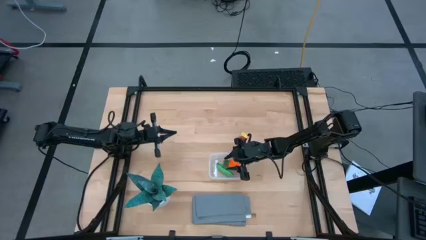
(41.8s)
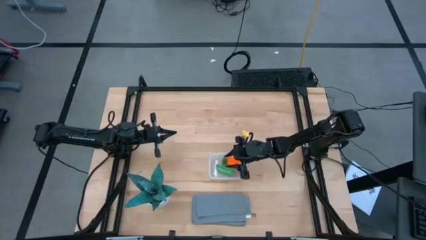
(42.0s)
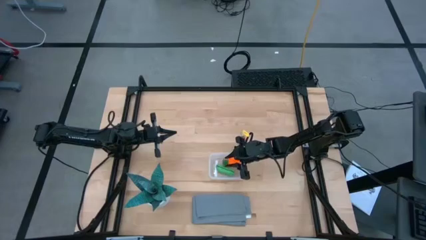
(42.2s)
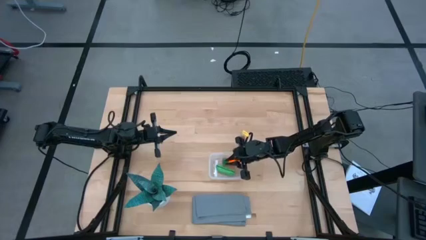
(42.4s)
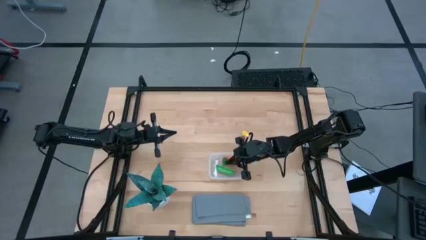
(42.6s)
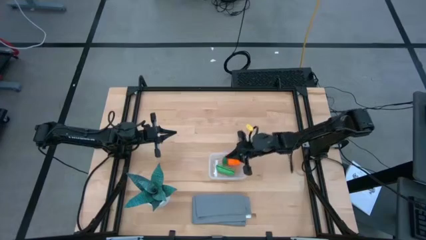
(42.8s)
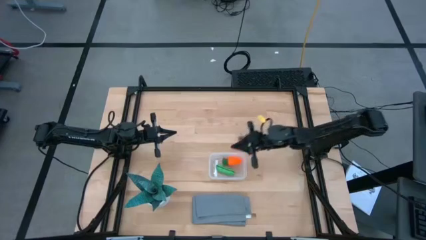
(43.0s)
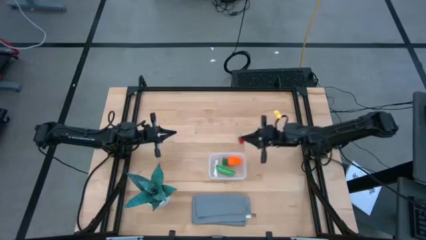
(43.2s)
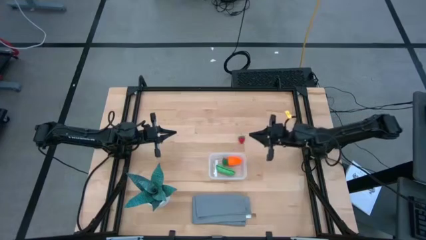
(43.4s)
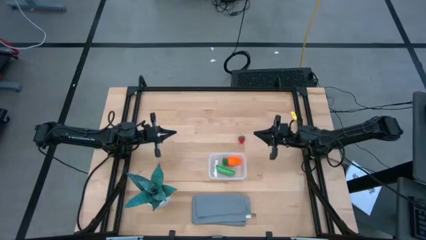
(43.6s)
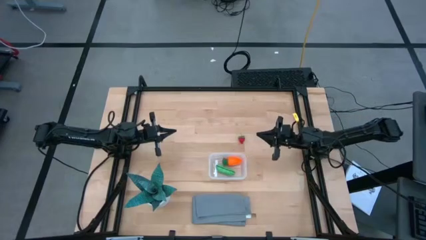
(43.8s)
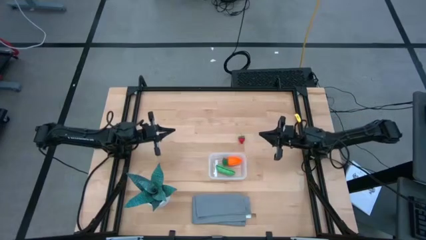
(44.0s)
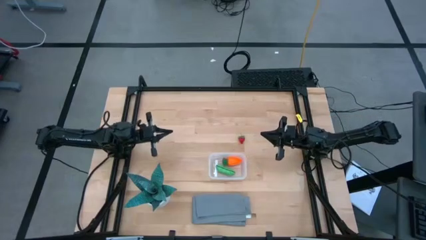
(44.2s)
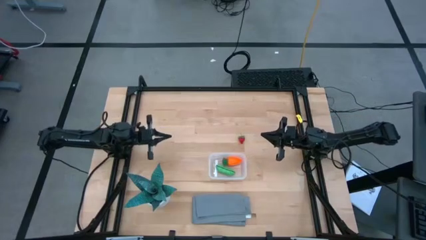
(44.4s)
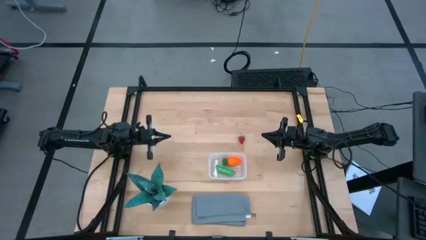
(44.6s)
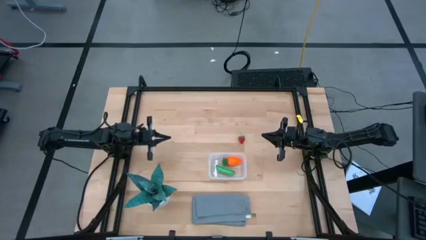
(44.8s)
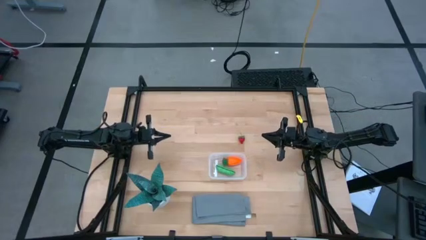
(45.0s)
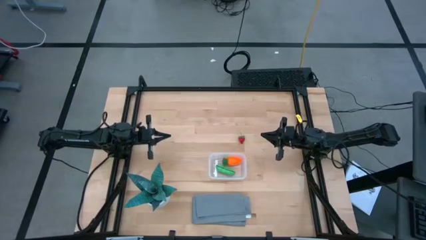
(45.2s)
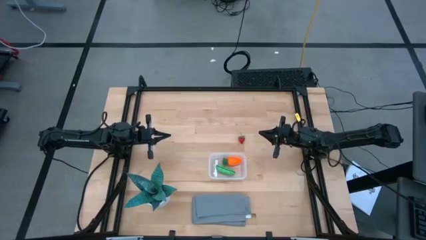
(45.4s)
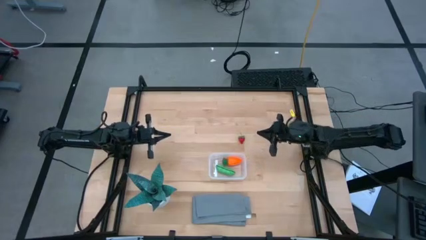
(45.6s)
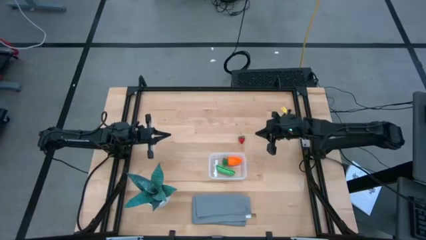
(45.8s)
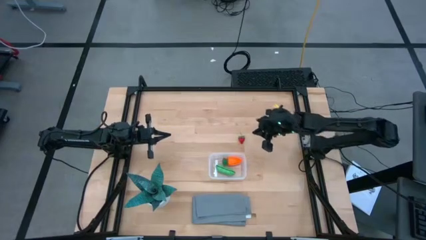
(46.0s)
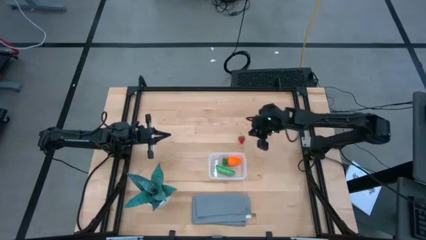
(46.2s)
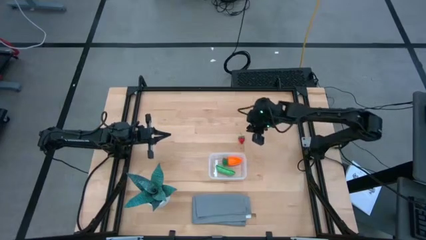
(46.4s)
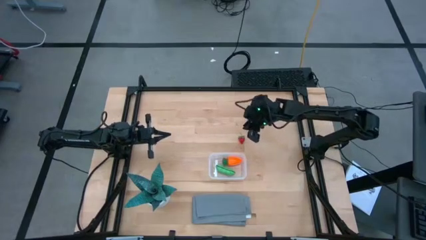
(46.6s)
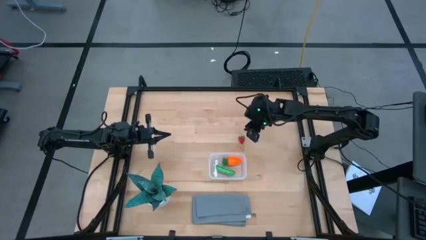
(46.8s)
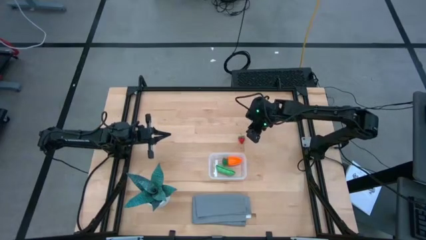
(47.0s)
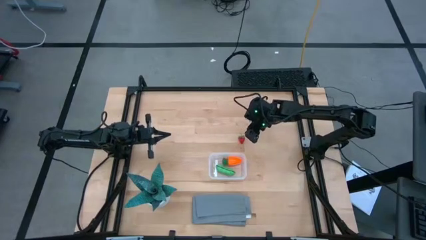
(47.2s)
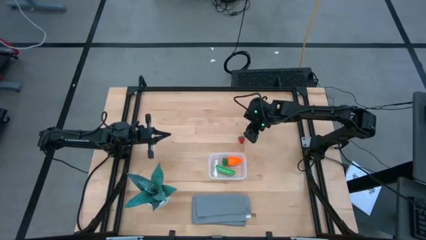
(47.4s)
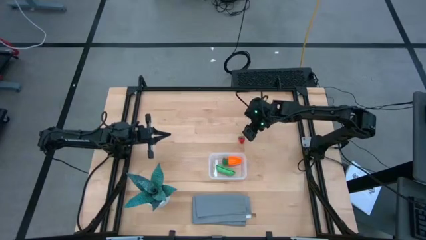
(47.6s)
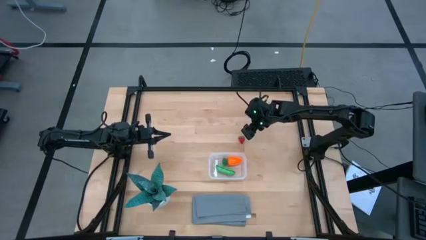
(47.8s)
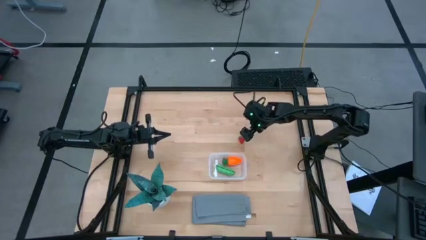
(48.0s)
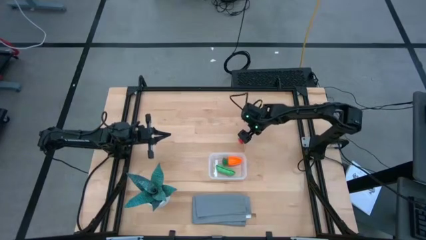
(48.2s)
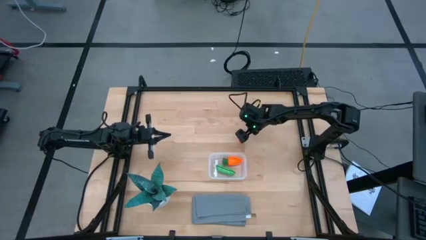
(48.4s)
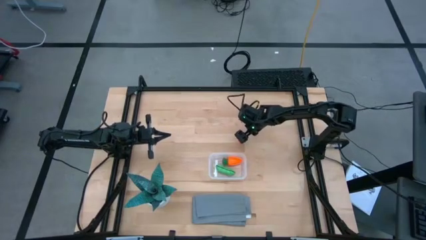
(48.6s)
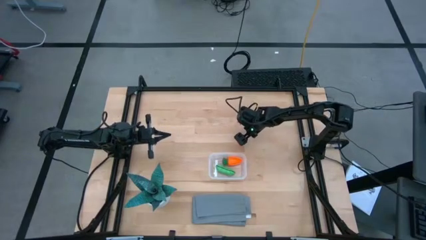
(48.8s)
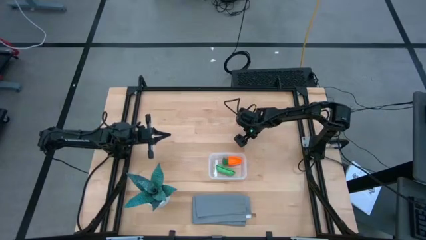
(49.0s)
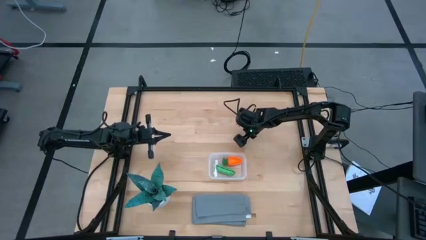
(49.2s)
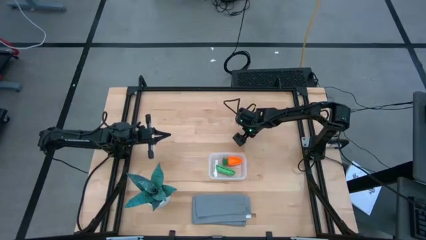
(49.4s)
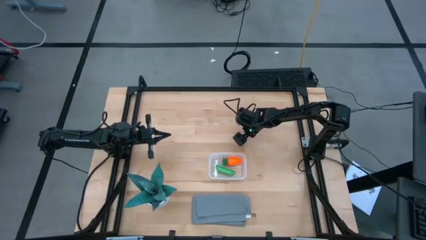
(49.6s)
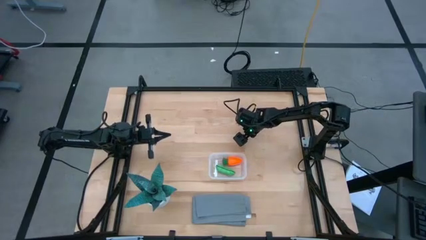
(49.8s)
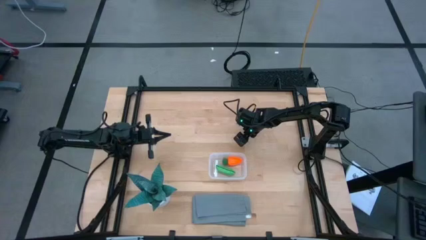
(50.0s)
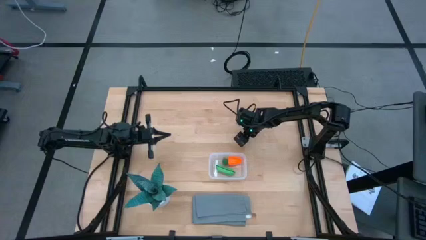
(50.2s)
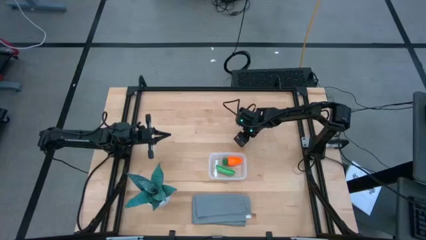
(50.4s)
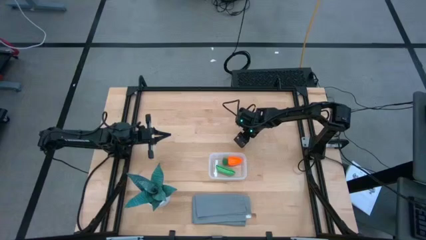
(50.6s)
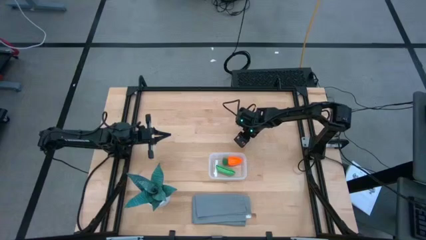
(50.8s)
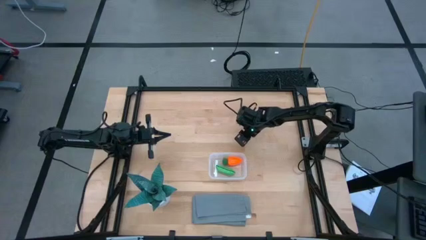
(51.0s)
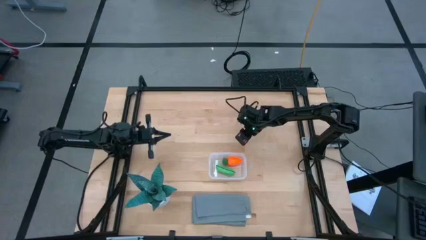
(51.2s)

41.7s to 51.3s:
Task: Pick and placing Produce into tupperware
Put the red strawberry into the transparent bin

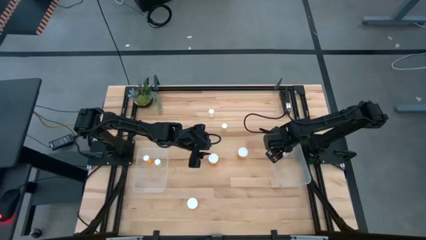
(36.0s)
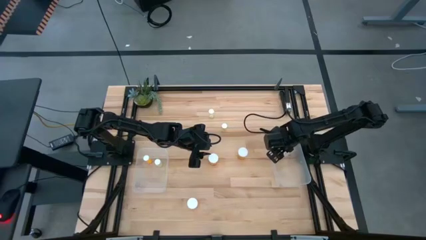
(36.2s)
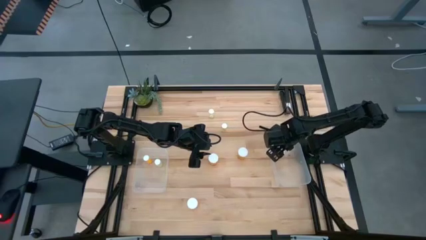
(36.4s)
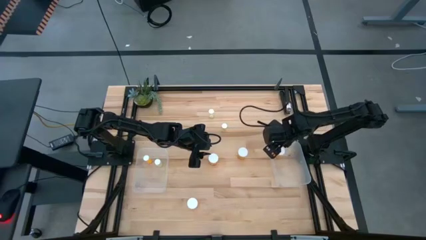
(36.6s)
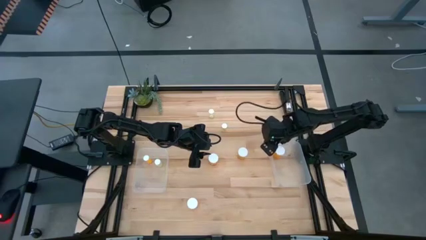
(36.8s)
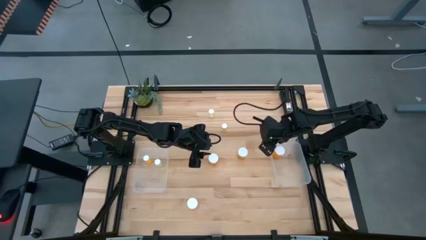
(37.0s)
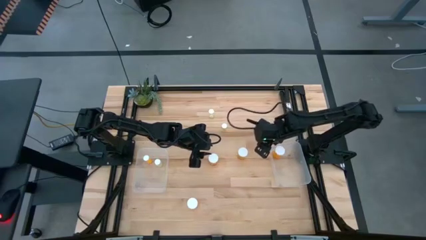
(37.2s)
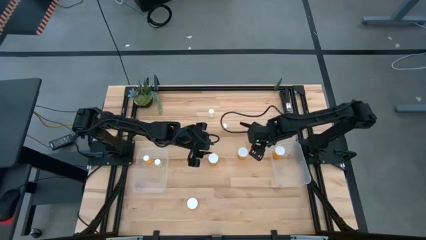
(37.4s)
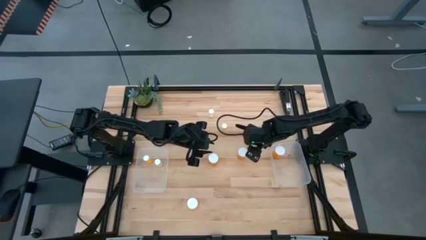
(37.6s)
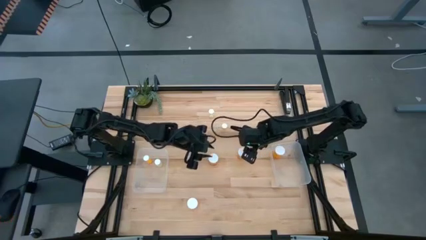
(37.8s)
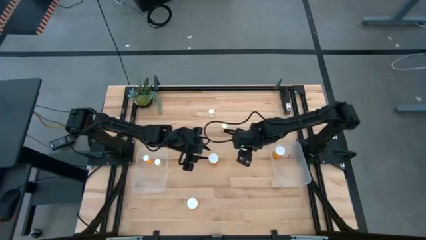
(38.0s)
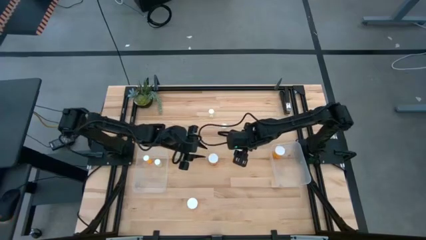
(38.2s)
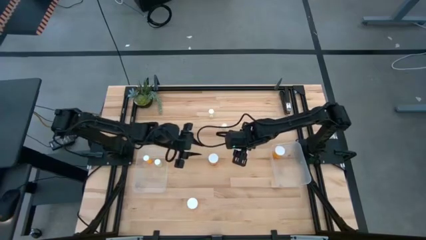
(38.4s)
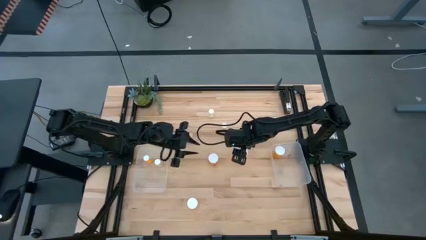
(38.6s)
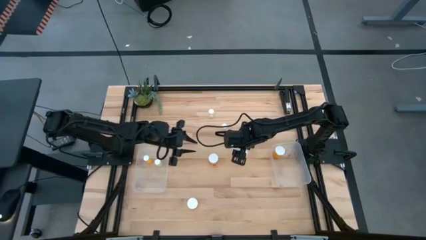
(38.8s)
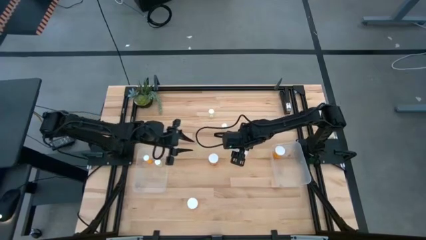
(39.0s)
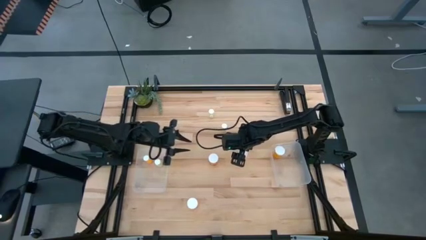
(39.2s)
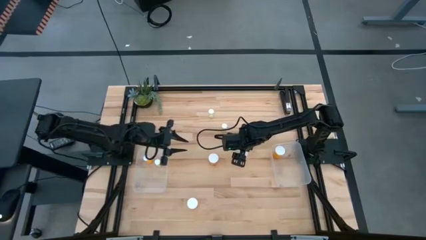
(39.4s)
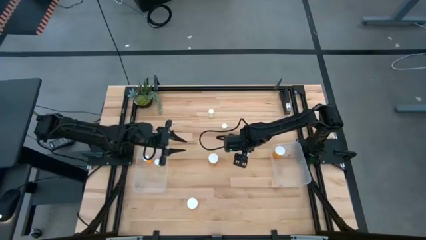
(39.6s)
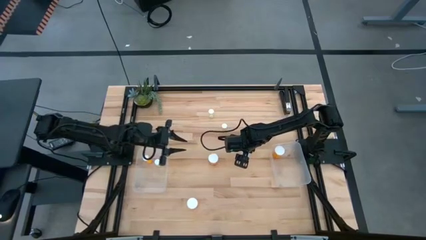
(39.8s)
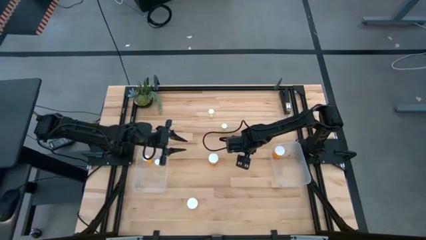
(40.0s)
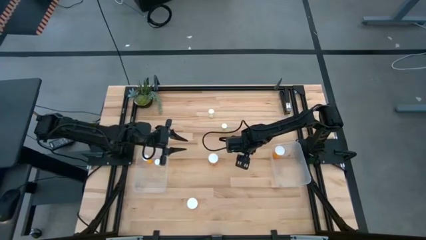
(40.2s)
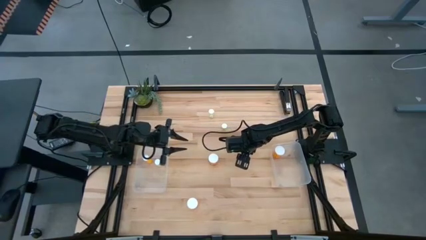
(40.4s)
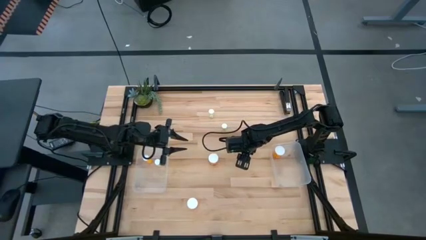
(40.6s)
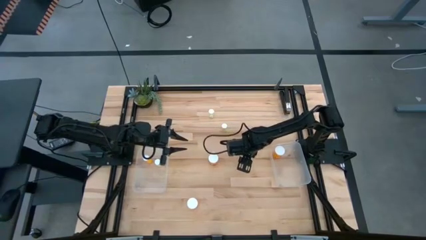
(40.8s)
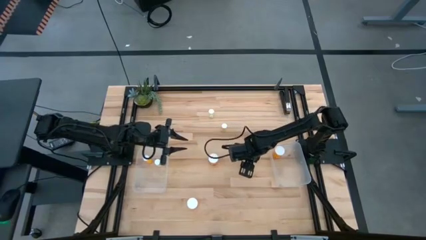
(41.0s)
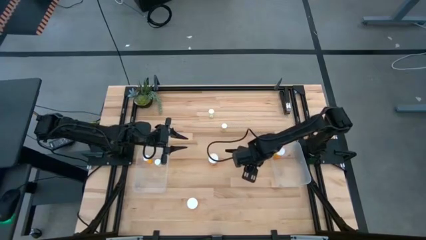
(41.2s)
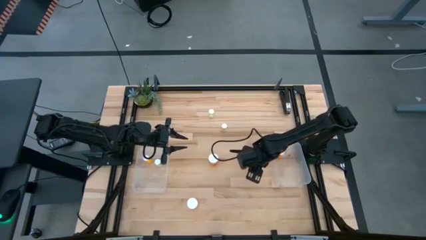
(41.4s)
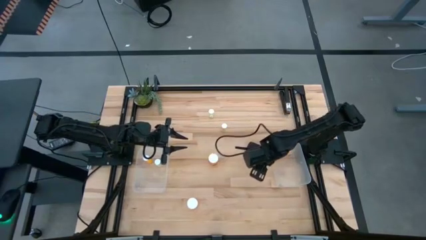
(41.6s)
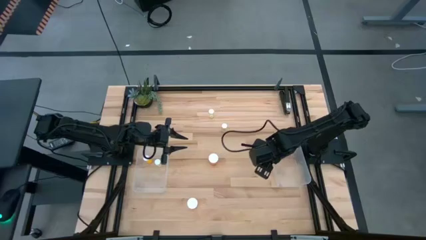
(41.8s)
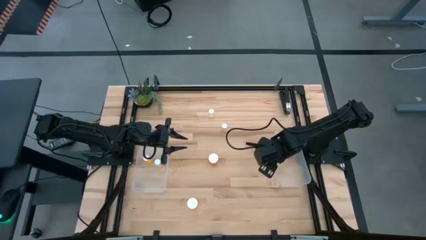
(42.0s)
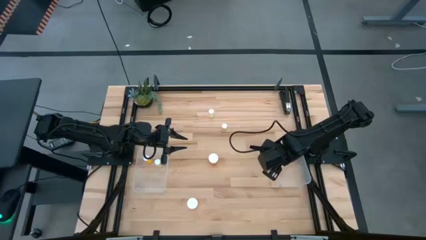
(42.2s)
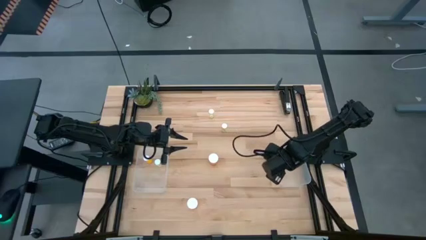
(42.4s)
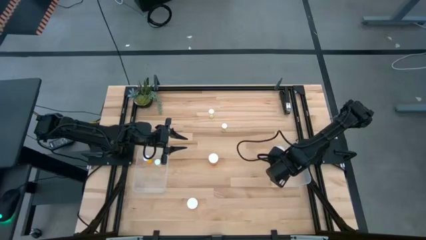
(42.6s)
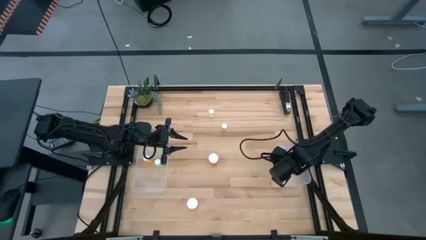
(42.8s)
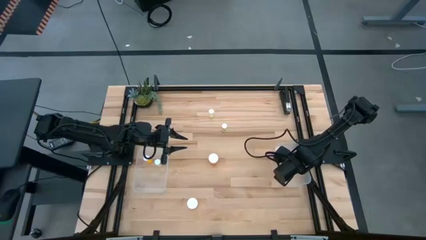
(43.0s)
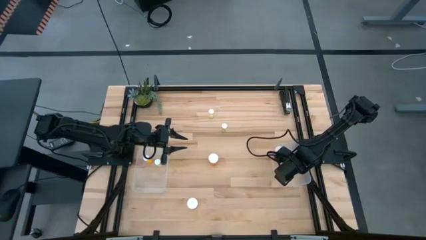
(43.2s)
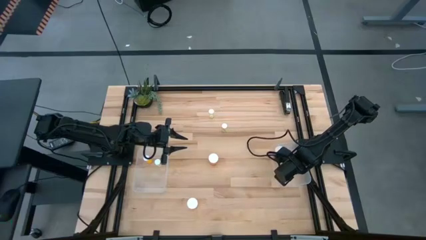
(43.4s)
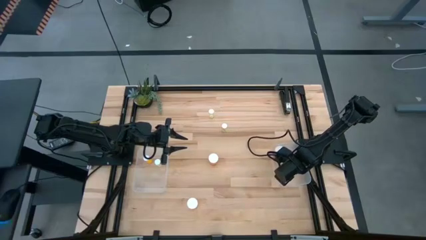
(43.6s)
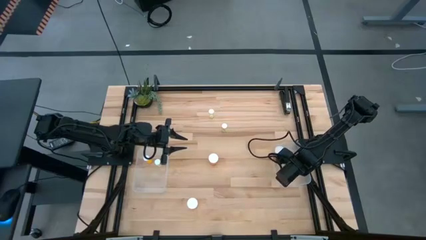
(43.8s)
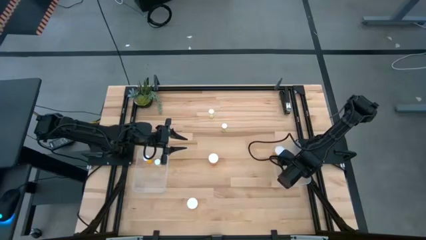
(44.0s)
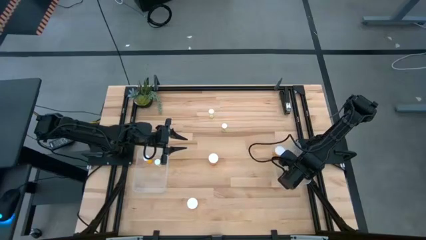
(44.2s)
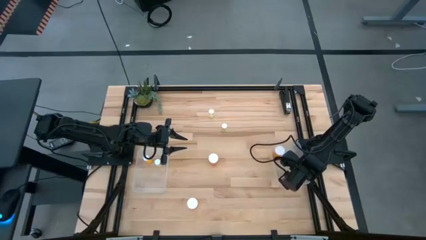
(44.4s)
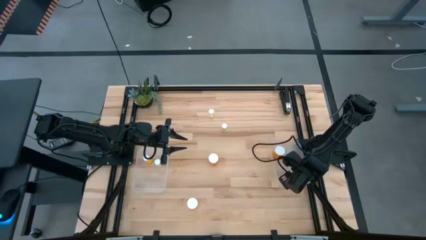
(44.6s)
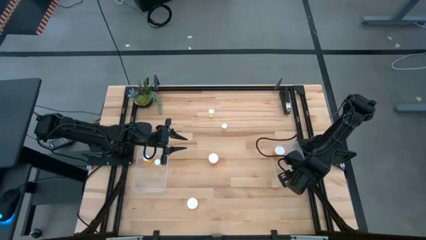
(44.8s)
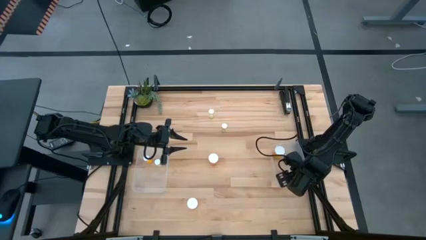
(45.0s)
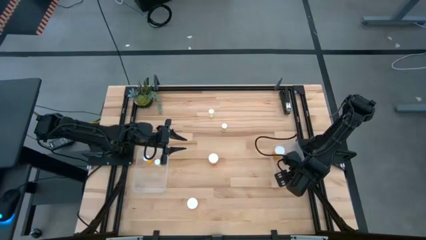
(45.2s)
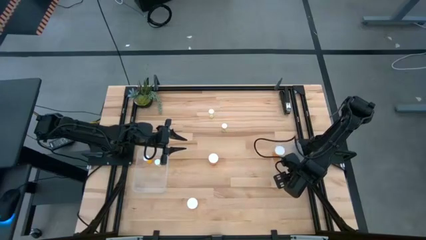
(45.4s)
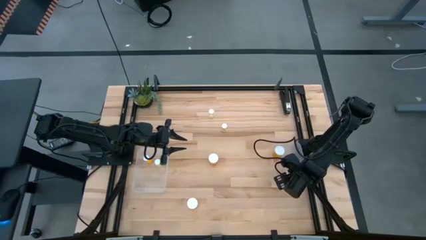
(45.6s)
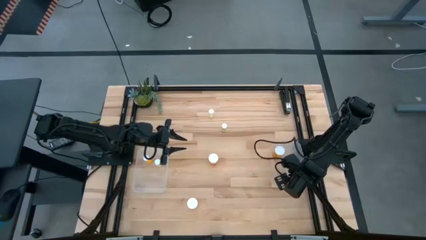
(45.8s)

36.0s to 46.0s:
Task: Pick and place medicine bottles into bin by pill shape (circle, oval)
Put the big middle right yellow pill bottle into the right transparent bin
